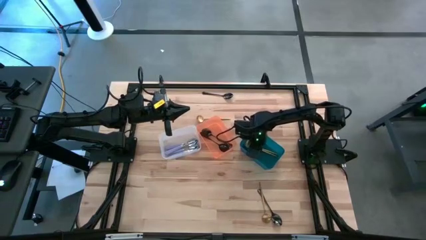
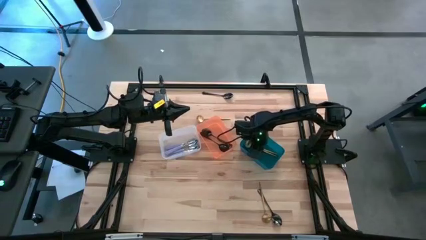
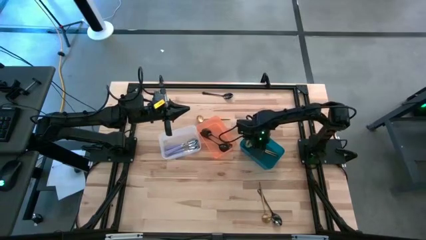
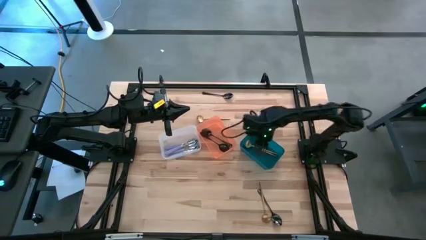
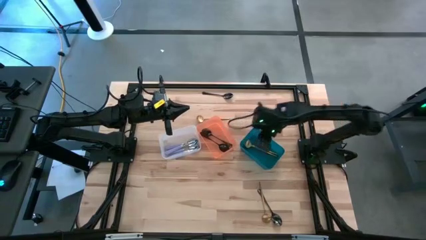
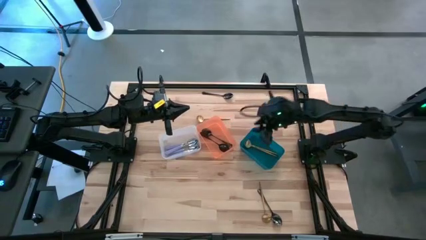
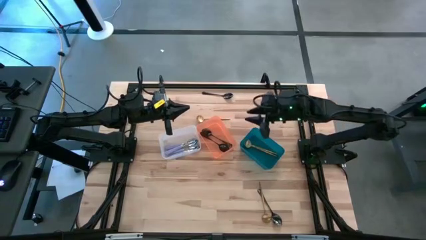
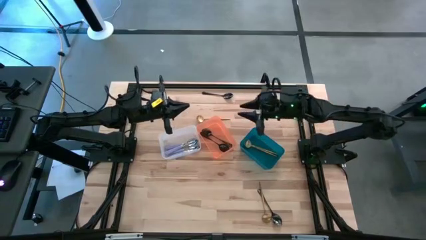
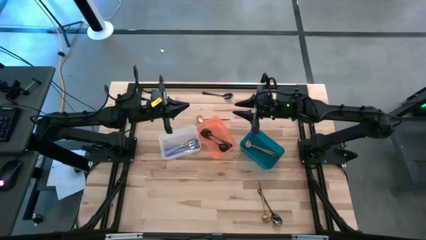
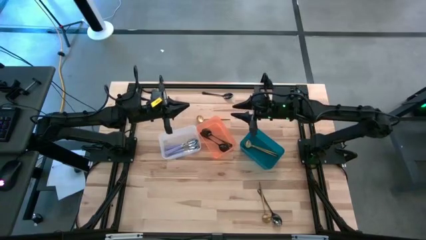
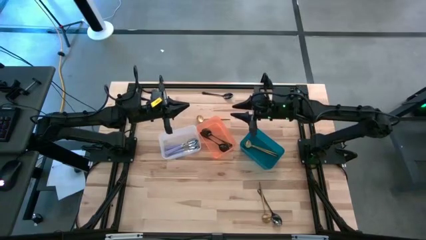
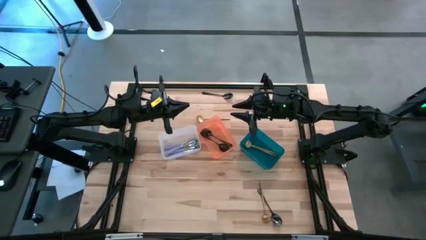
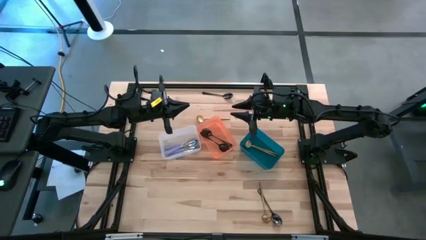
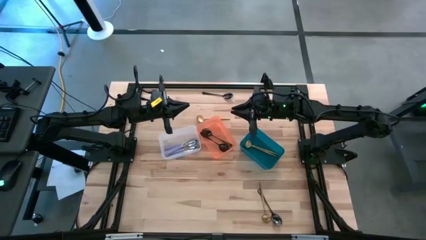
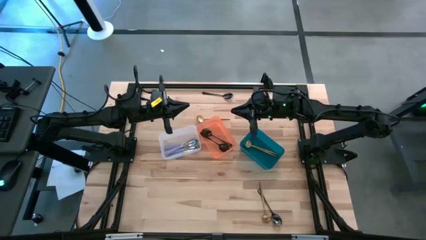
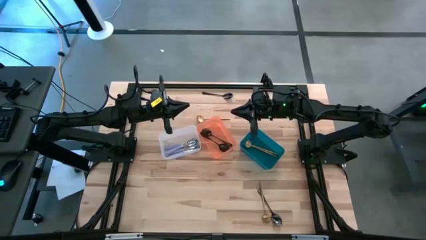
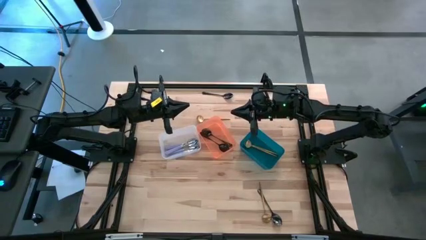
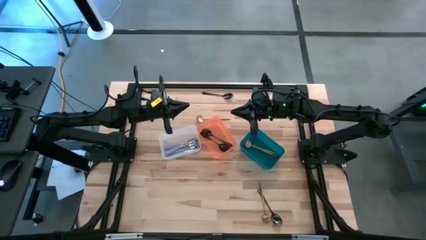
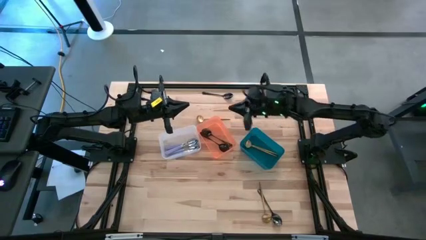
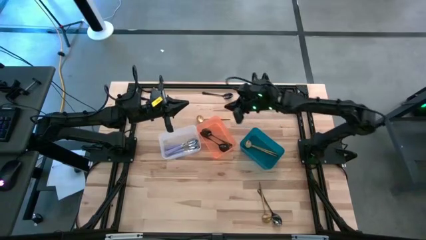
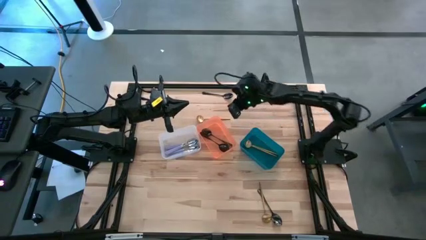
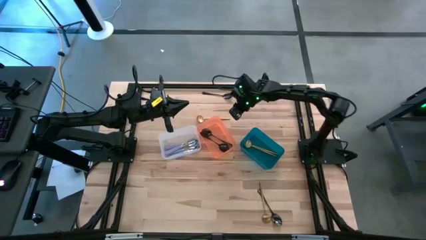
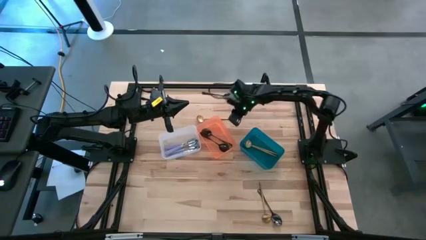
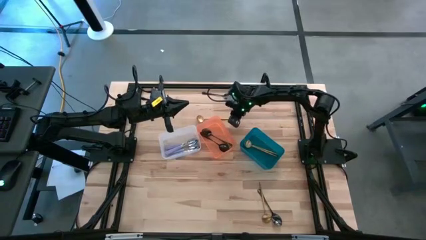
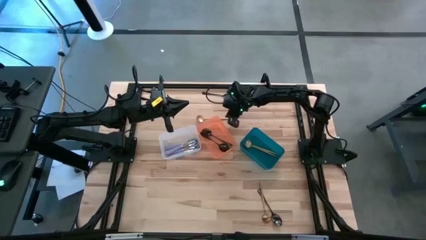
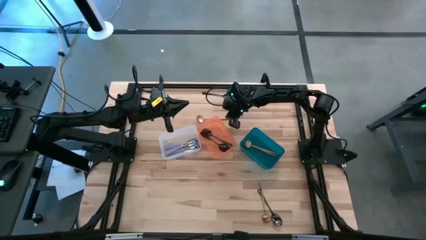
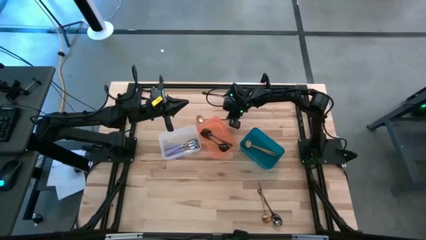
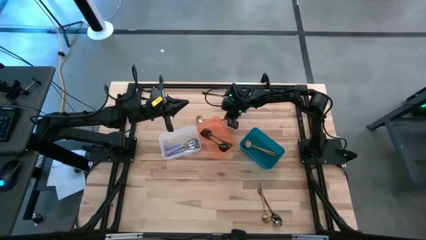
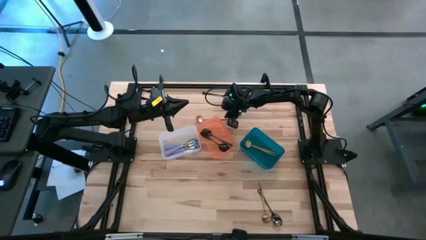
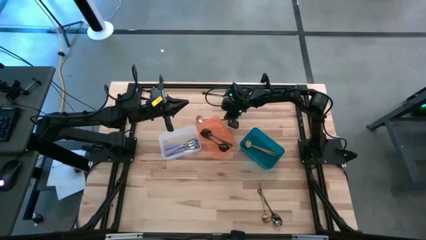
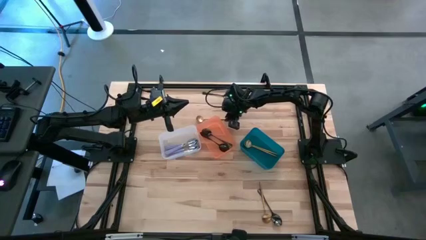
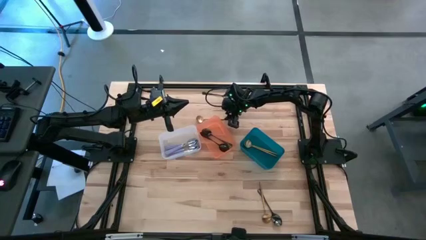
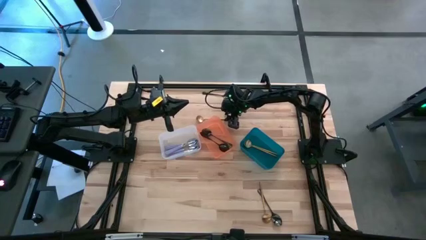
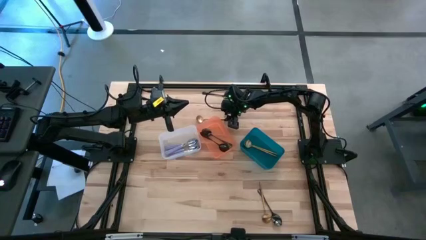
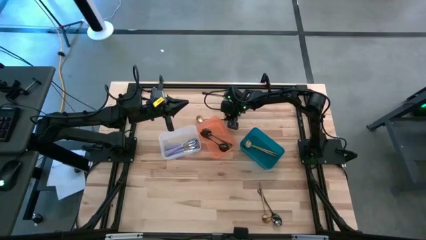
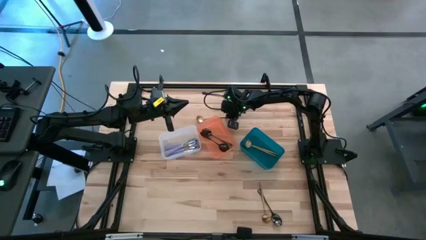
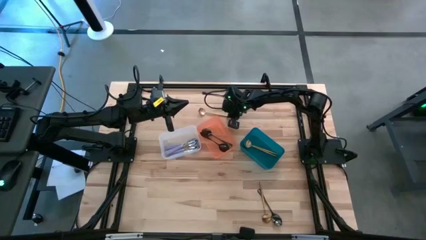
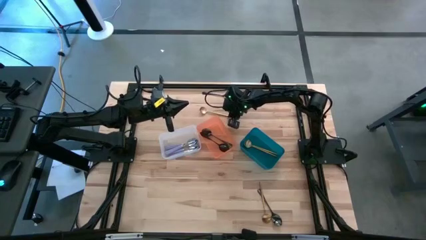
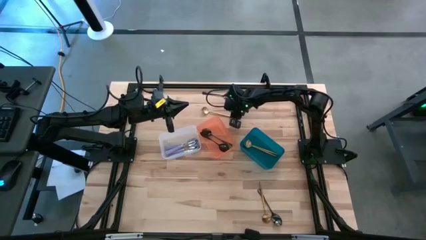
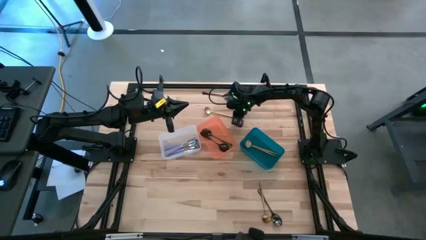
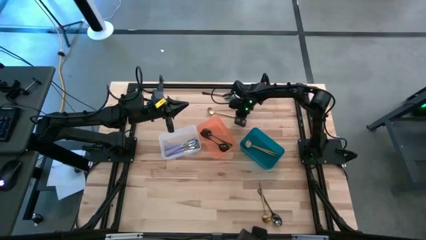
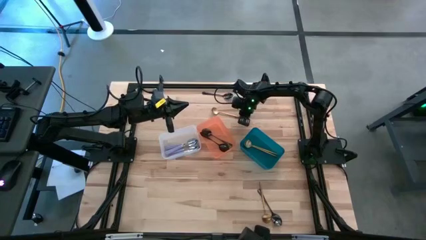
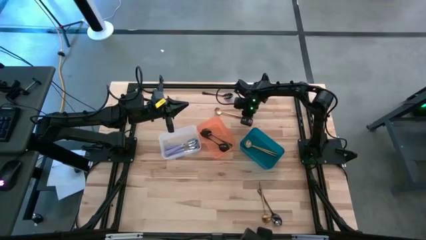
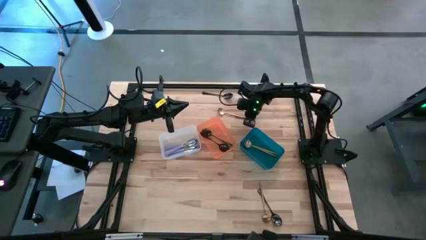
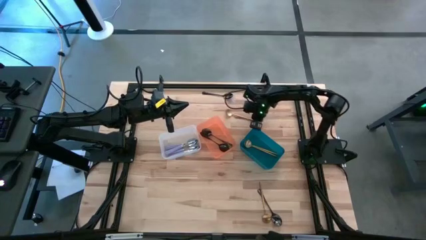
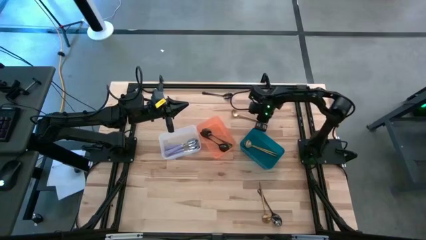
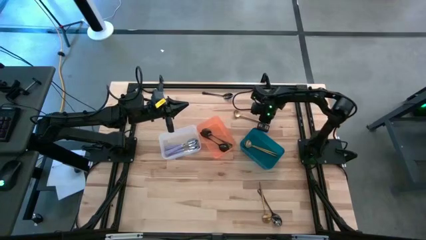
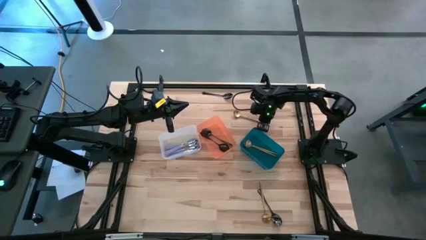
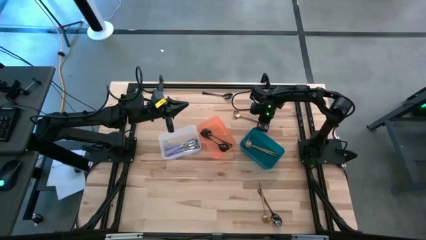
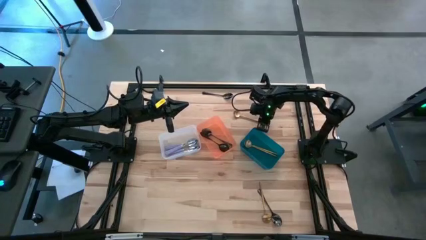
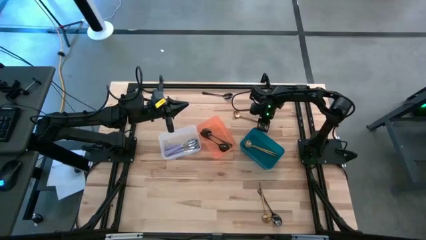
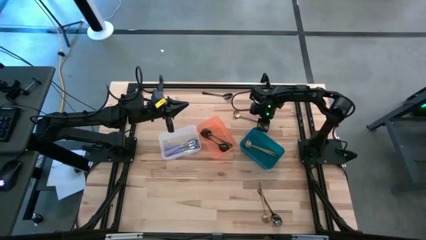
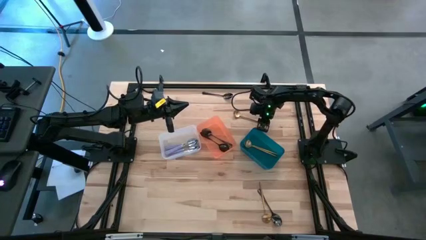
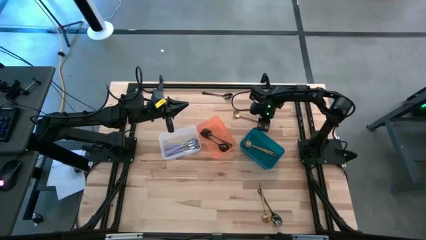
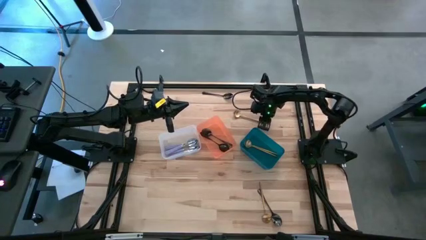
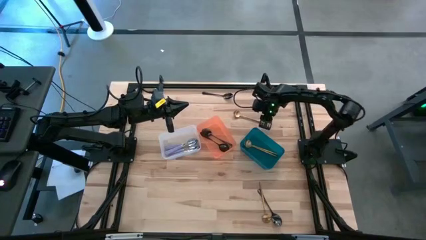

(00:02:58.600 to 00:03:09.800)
Task: Sort silverware by color (type)
Put the gold spoon into the blue bin

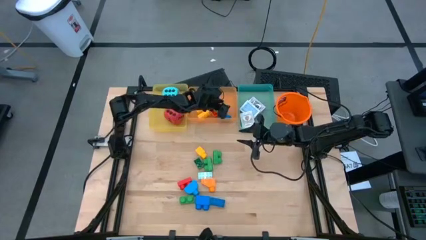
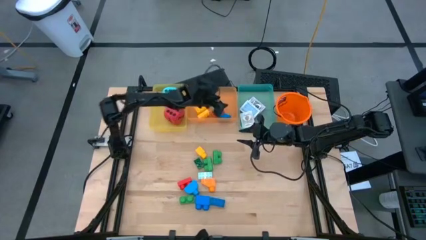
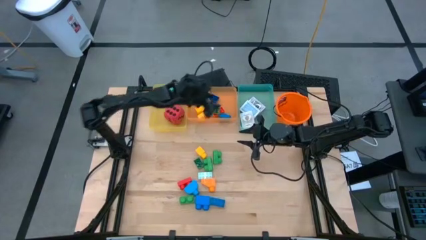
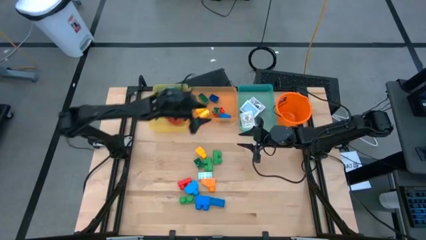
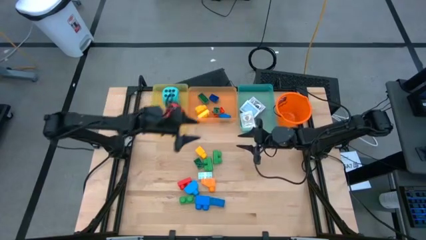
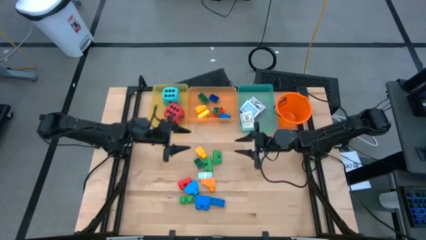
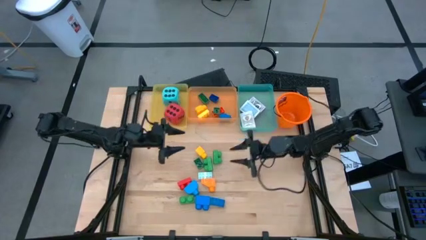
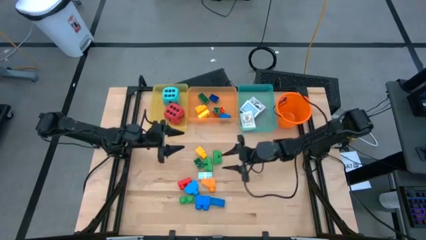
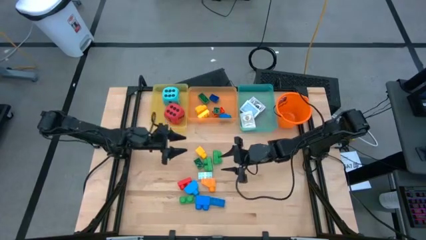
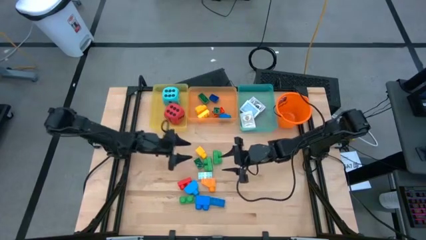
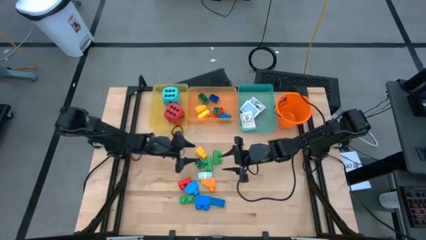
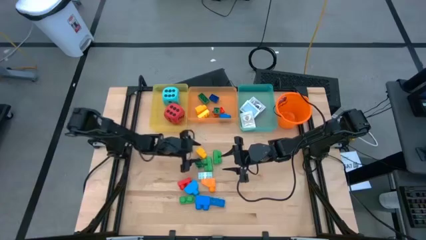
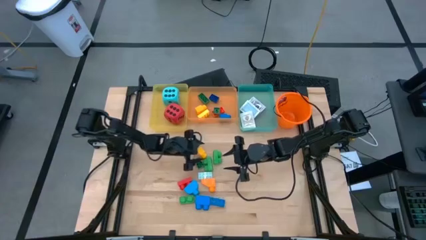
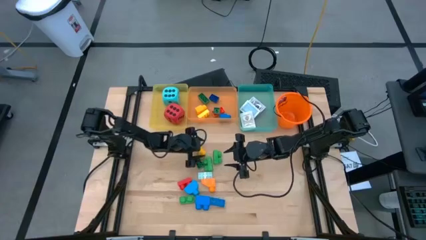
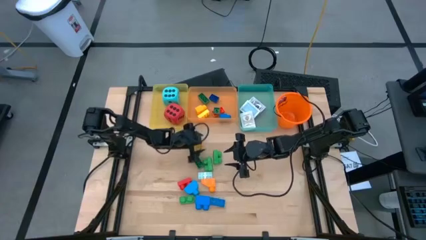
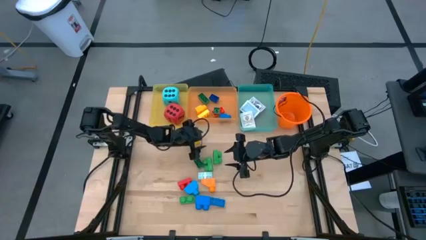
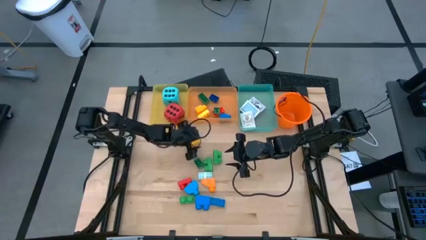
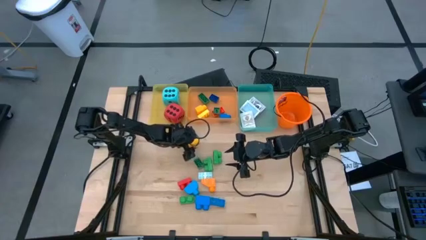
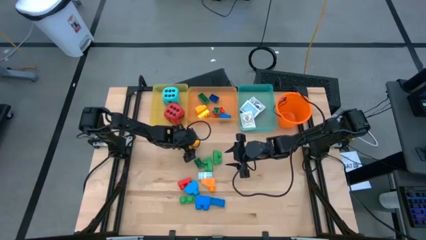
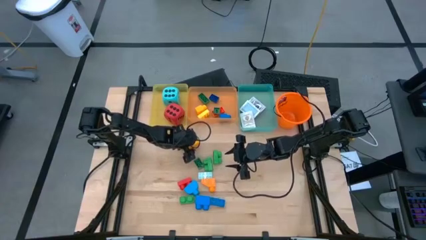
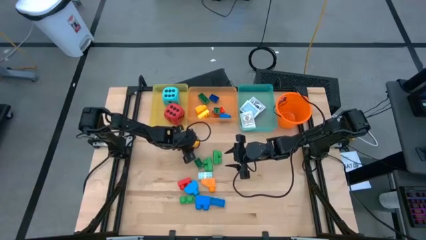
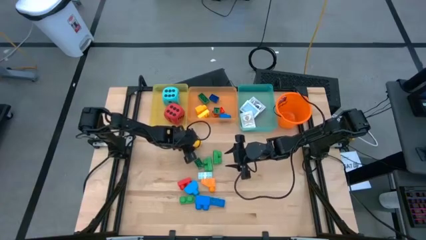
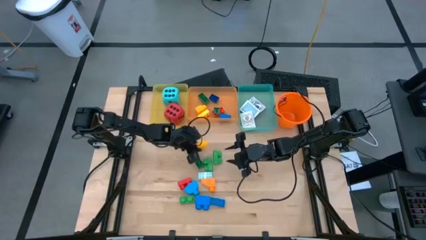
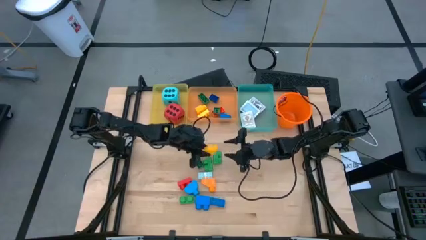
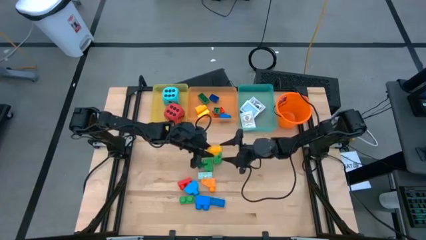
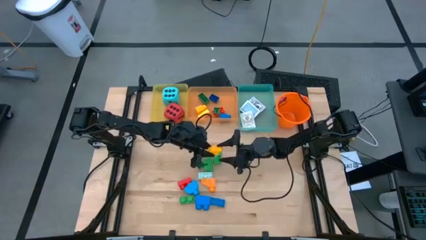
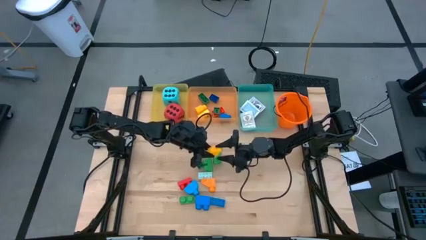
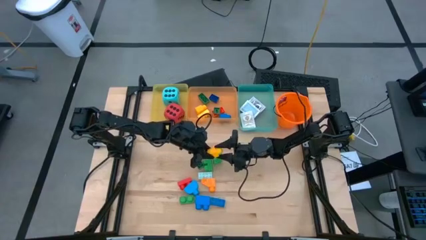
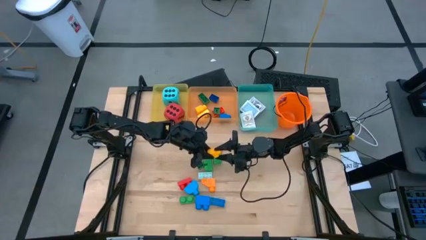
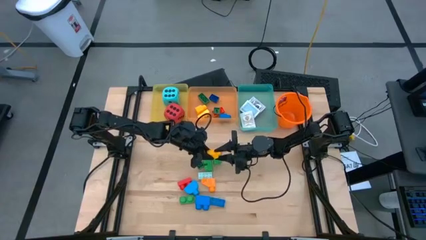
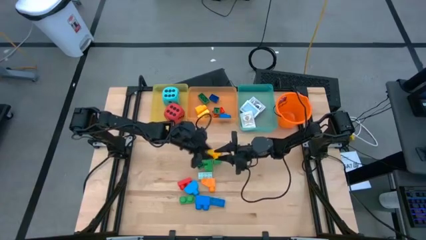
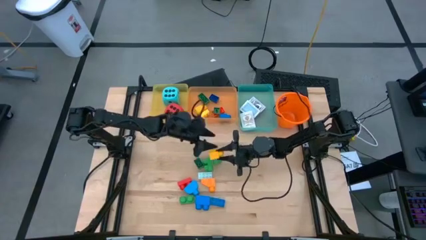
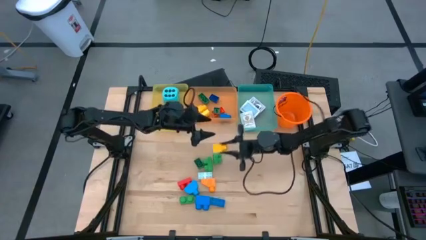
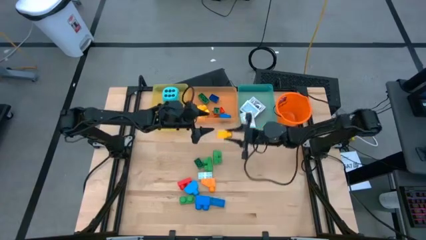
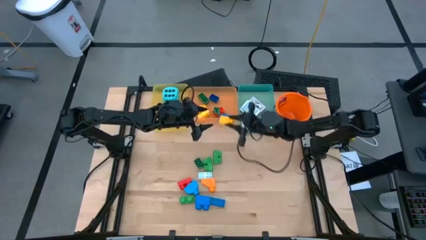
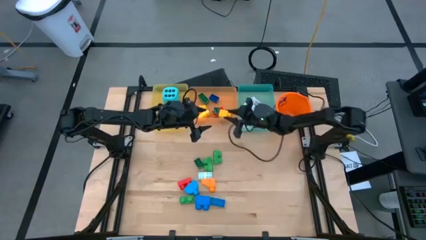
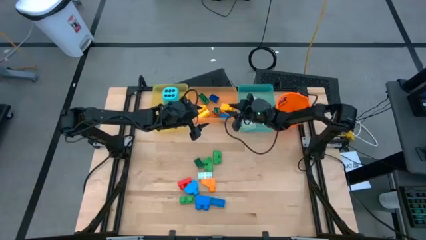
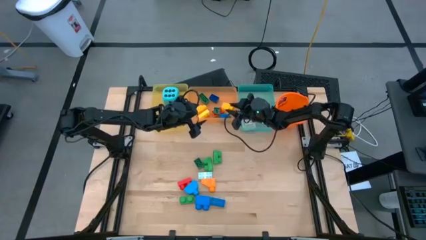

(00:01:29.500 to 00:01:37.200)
Task: Pick & Place Toys
Put the yellow game piece into the orange bin
